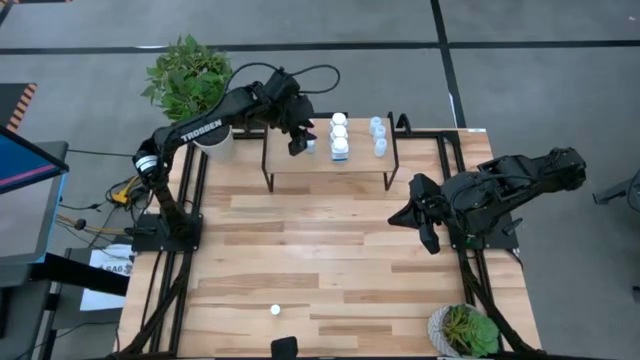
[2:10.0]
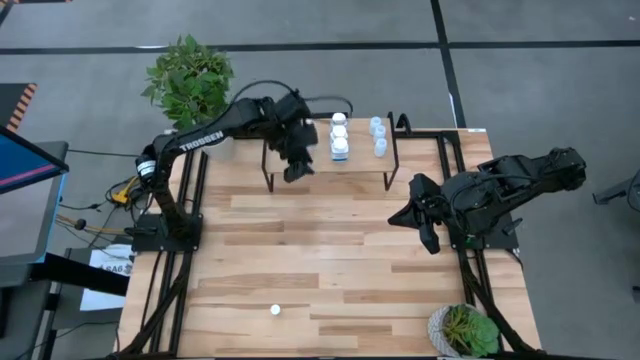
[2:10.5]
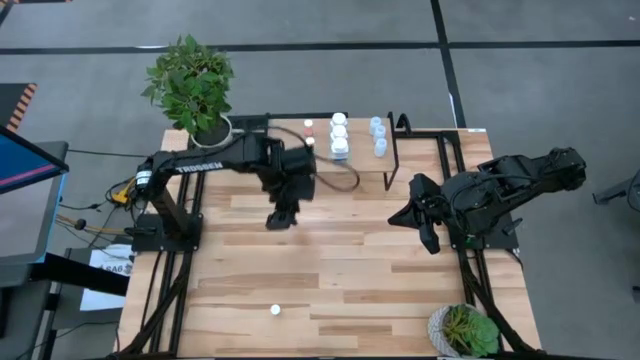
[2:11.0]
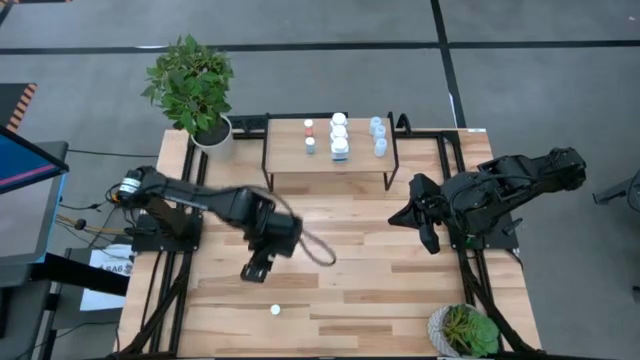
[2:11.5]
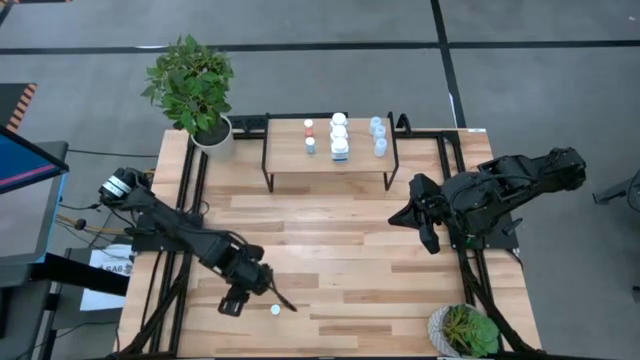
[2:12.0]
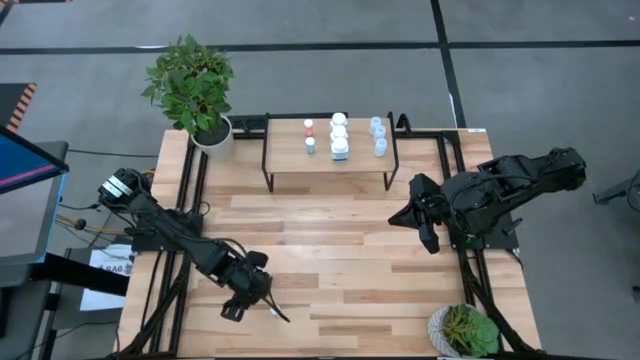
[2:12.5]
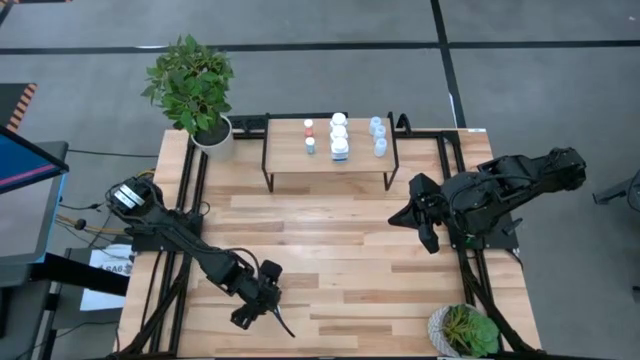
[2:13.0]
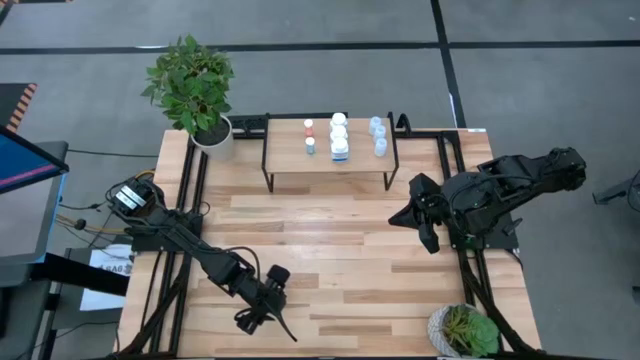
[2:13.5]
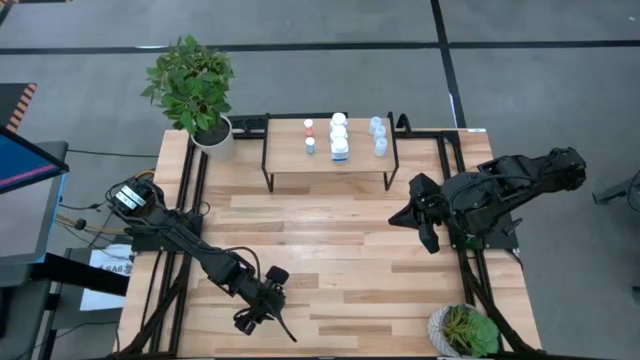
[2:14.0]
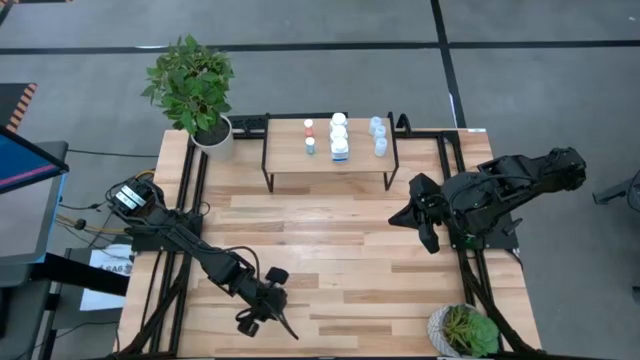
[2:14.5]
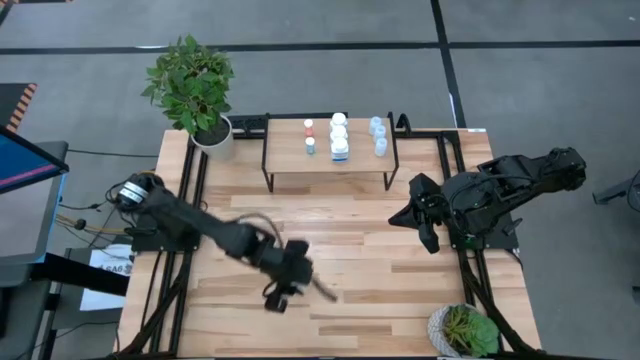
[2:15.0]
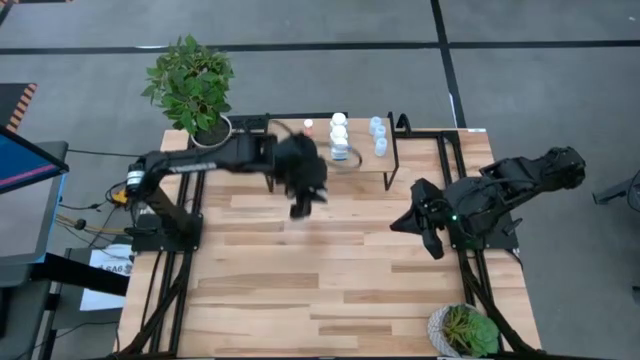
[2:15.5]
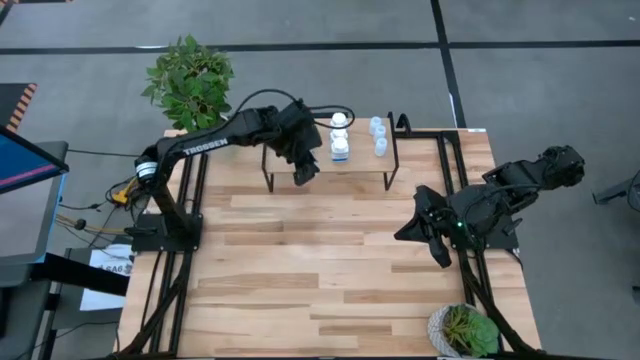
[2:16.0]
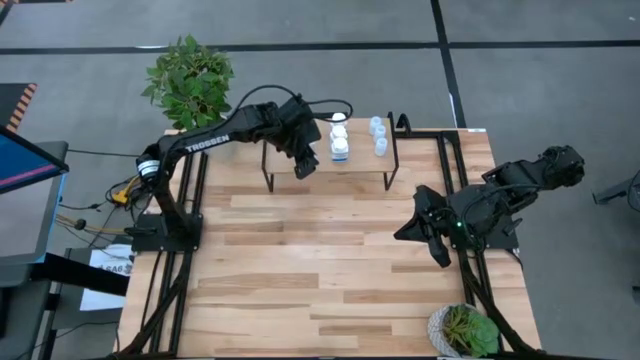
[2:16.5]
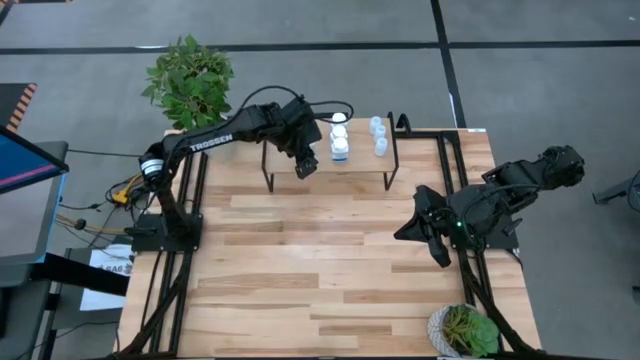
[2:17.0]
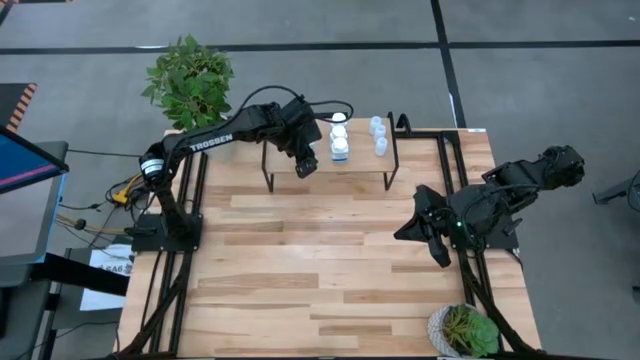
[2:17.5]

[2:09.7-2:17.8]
Task: Pick and place medicine bottles onto shelf by color
Put the yellow medicine bottle on the shelf

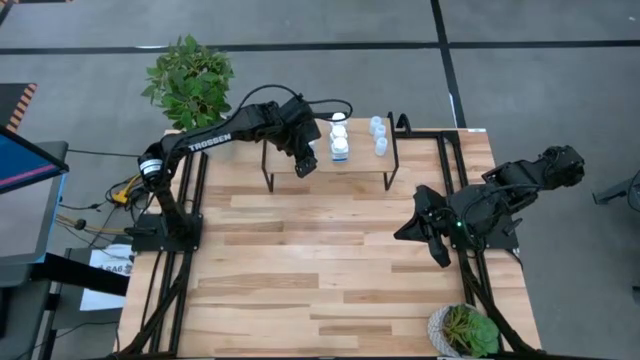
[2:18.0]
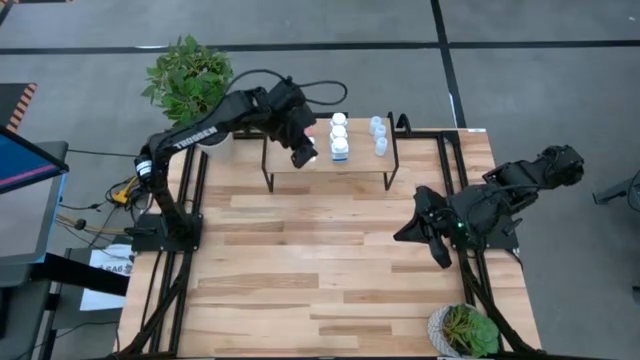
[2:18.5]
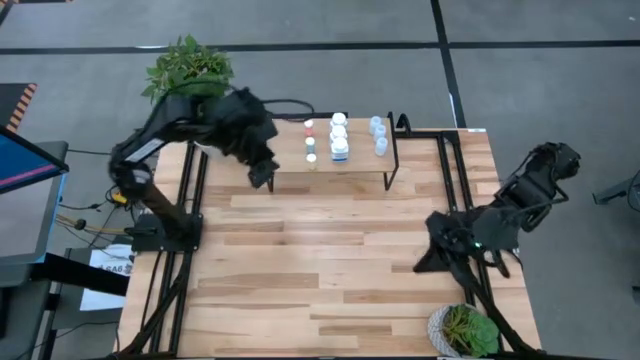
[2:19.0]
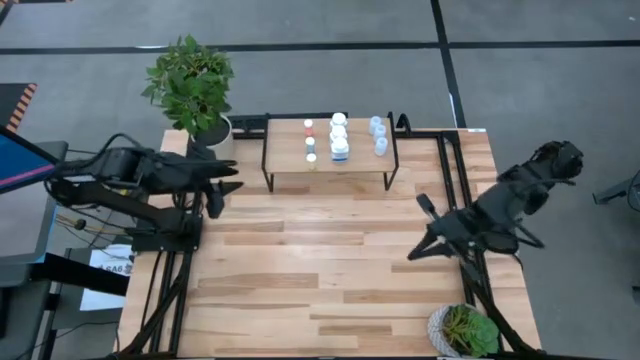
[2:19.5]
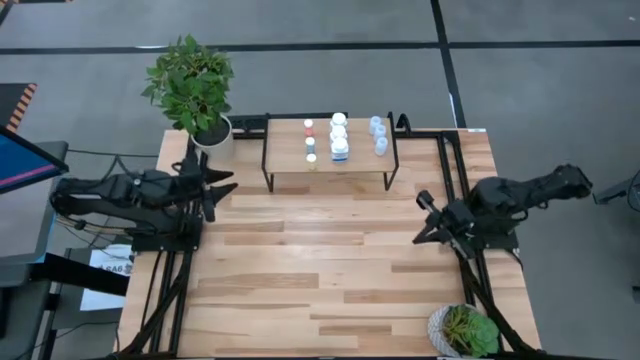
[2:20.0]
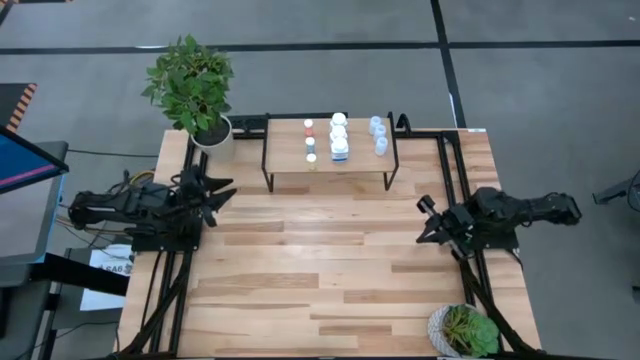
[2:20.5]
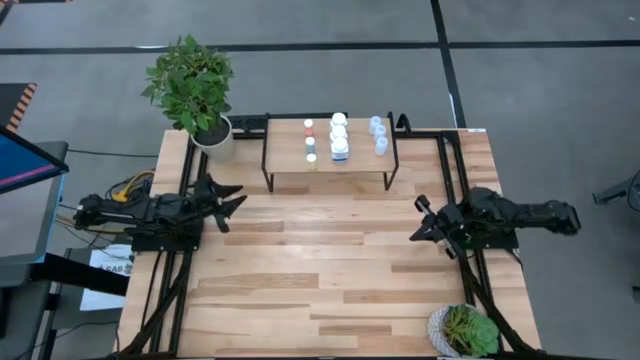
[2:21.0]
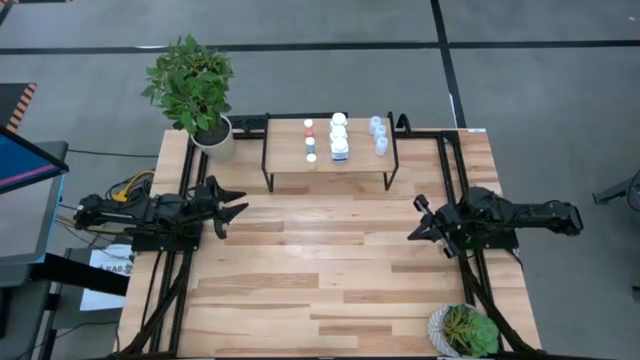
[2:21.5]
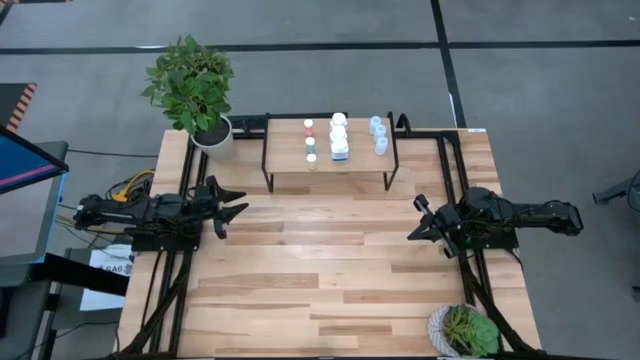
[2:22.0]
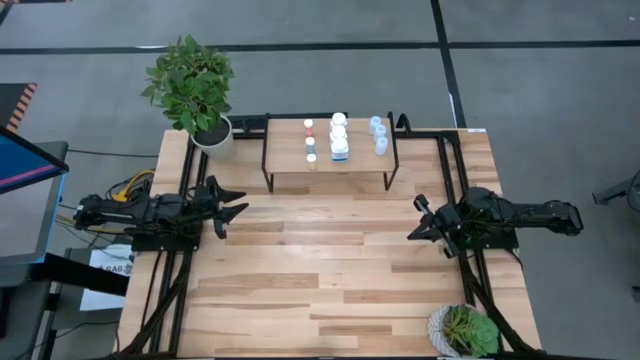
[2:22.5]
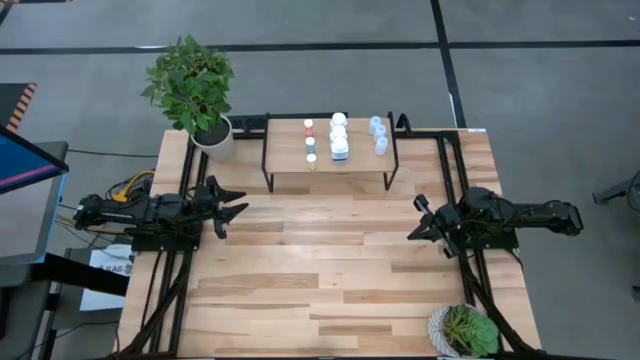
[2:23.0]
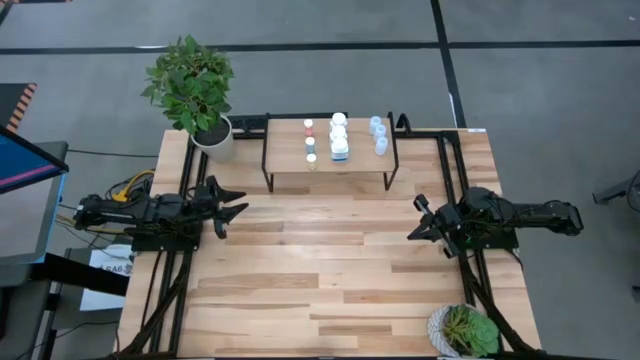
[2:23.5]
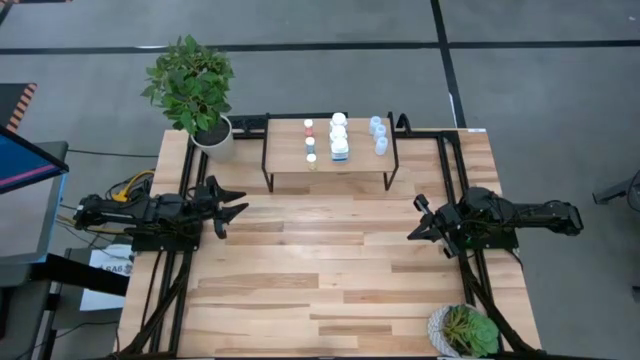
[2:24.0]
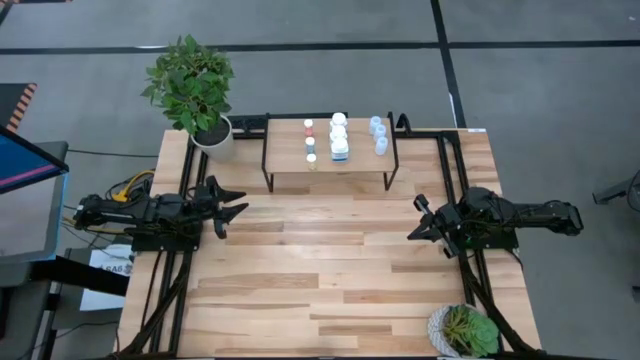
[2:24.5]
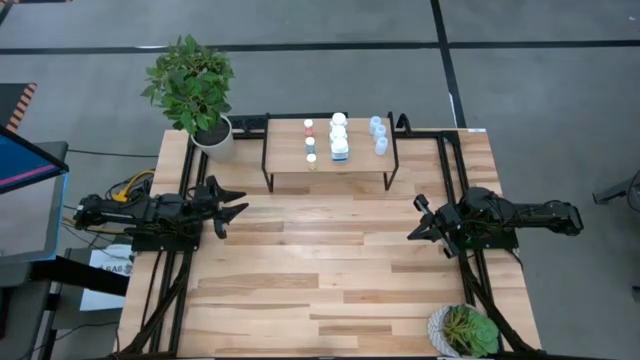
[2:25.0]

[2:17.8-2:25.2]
Return to Home Position

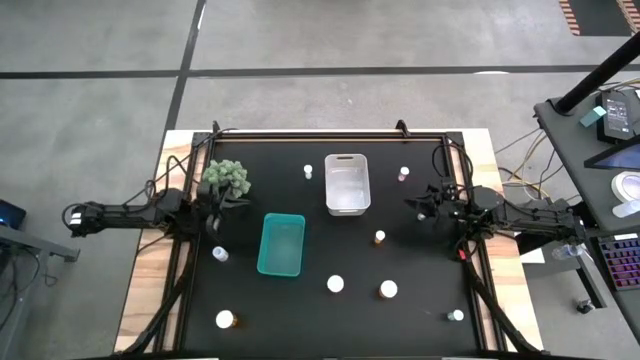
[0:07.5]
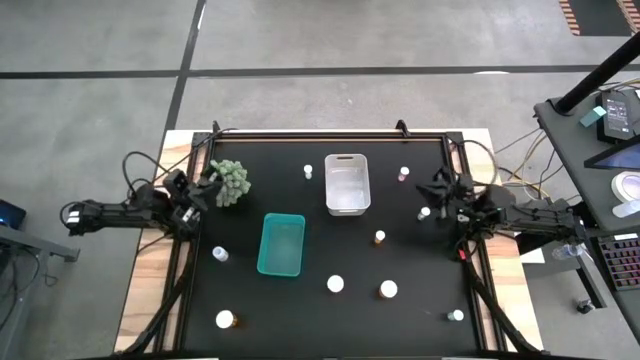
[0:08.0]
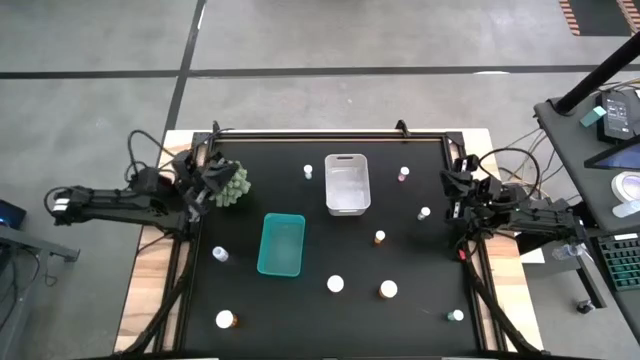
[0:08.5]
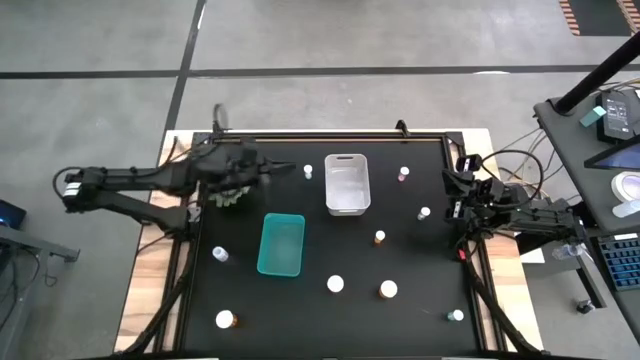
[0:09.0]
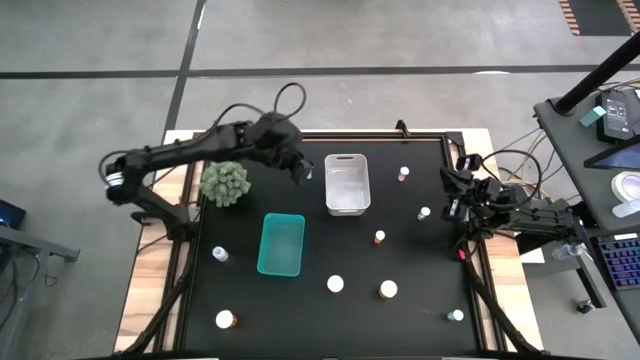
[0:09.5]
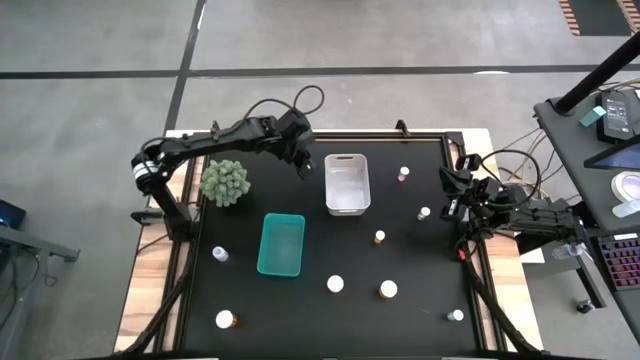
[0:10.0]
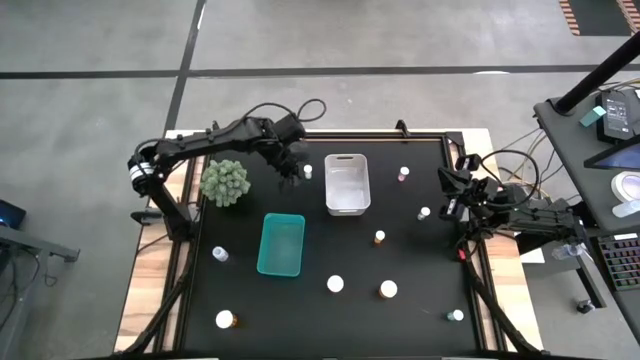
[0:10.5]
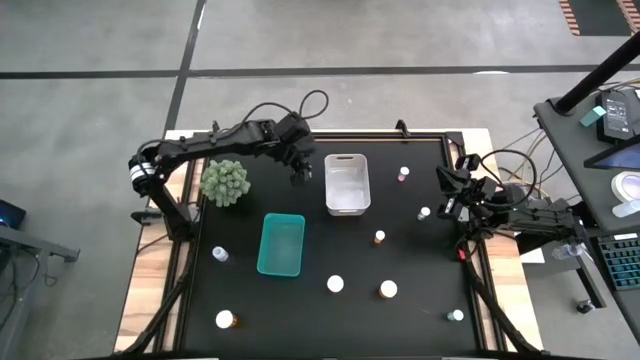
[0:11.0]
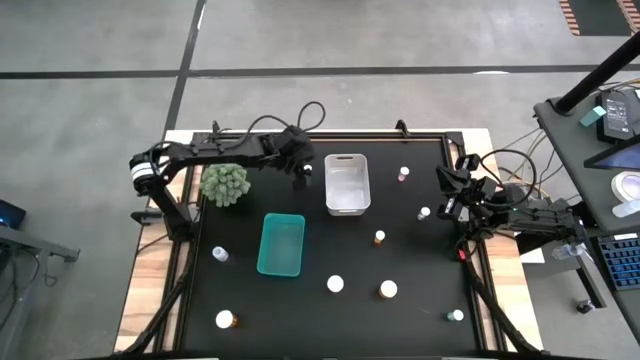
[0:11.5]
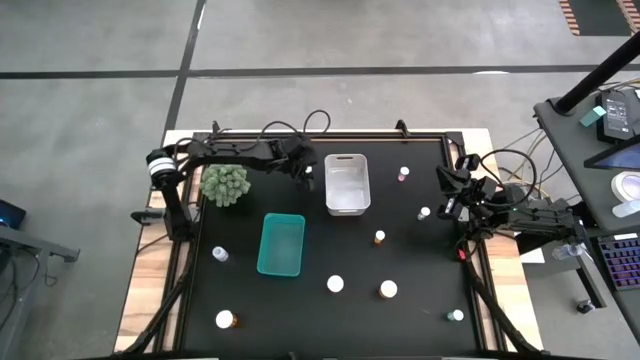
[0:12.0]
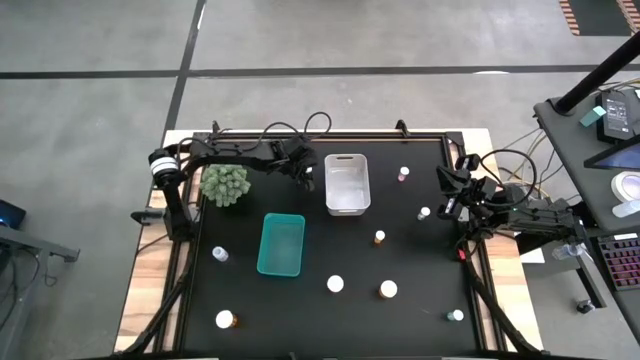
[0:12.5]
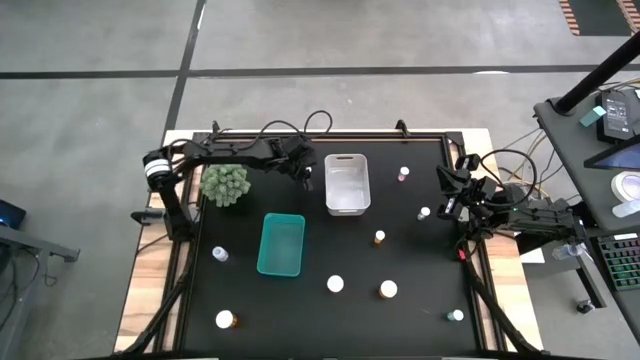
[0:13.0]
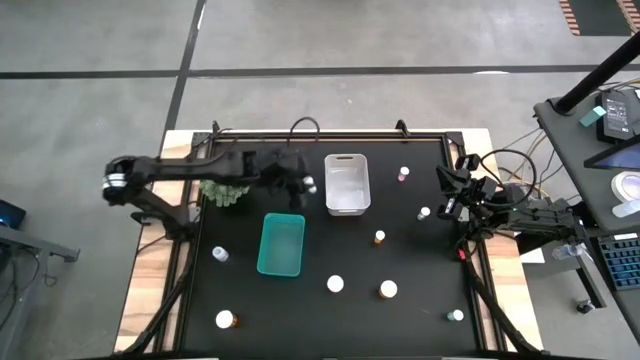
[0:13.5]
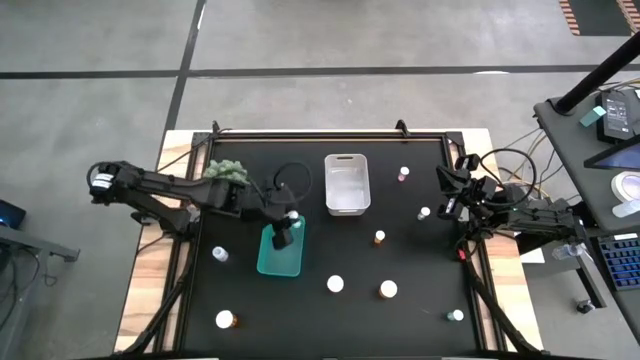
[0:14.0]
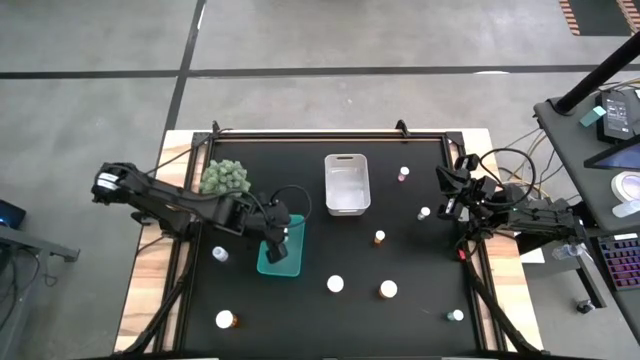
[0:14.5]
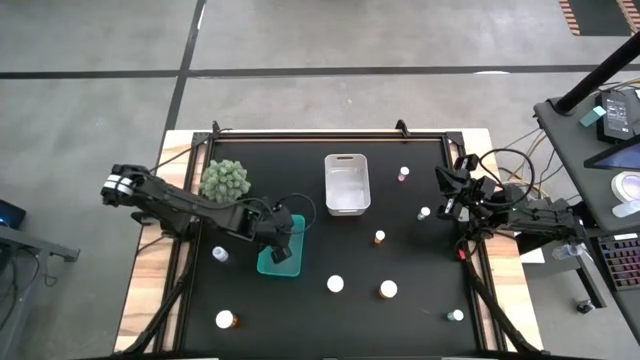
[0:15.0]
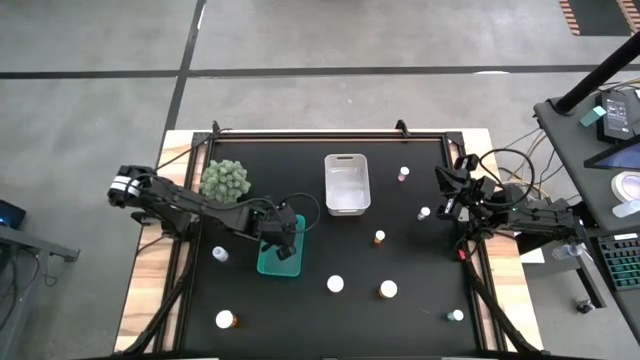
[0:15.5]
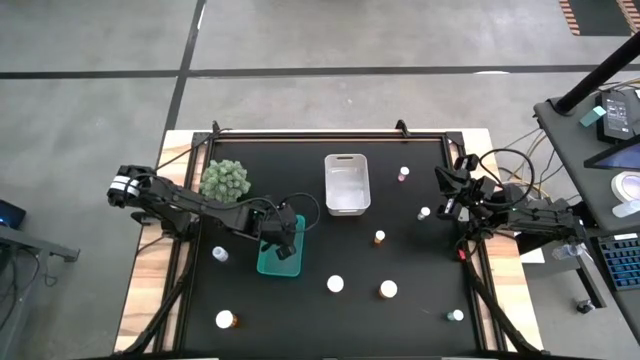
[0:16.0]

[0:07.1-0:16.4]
Task: Pick and place medicine bottles into bin by pill shape (circle, oval)
Put the top left blue pill bottle into the green bin
